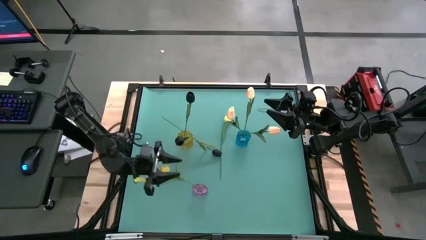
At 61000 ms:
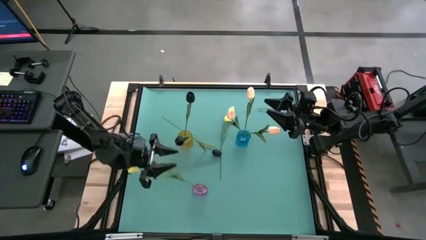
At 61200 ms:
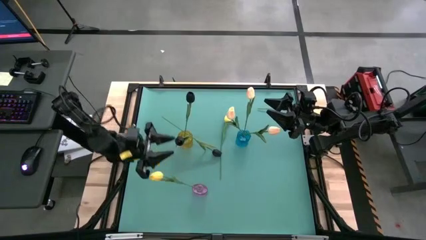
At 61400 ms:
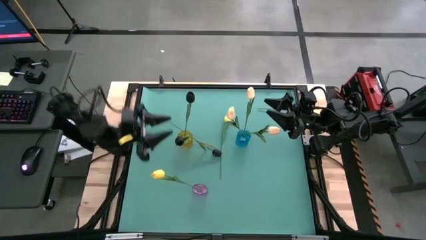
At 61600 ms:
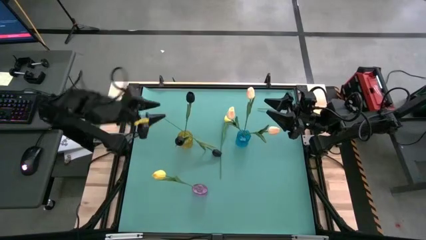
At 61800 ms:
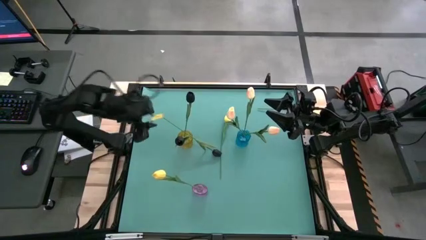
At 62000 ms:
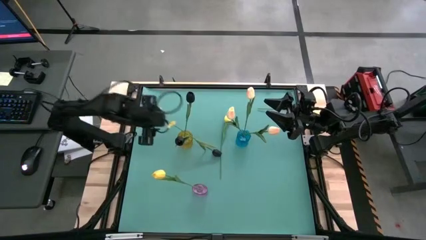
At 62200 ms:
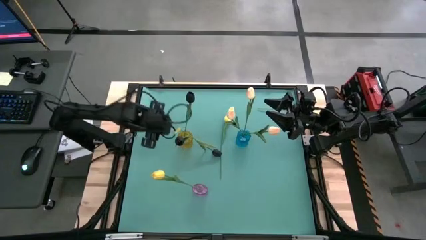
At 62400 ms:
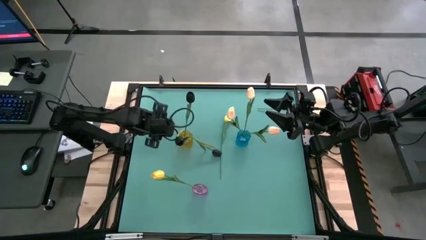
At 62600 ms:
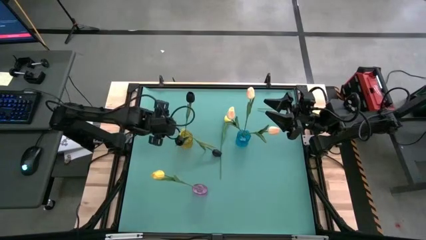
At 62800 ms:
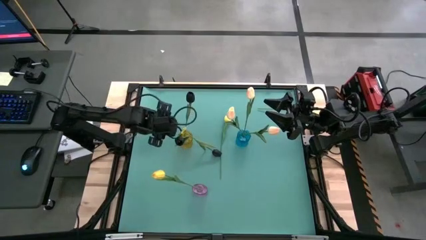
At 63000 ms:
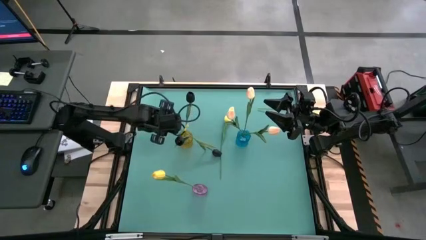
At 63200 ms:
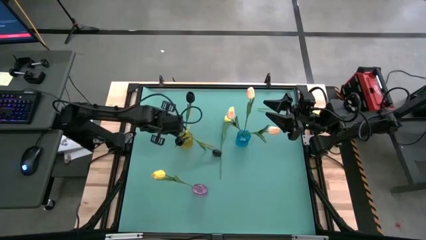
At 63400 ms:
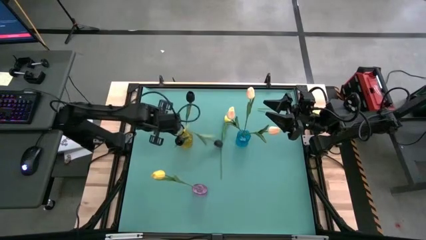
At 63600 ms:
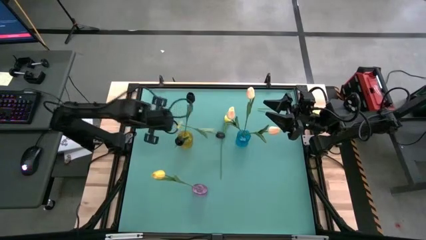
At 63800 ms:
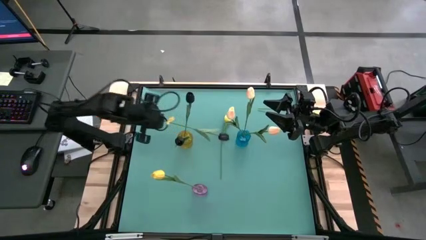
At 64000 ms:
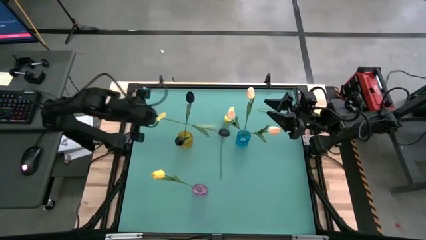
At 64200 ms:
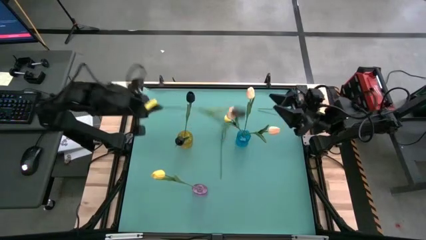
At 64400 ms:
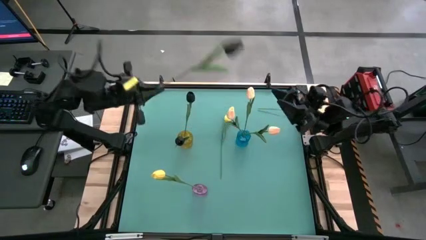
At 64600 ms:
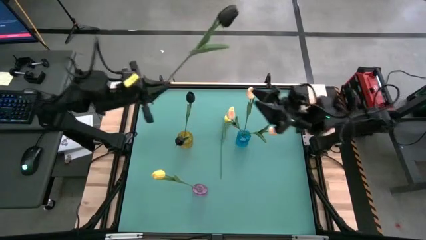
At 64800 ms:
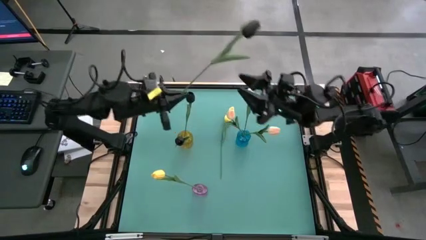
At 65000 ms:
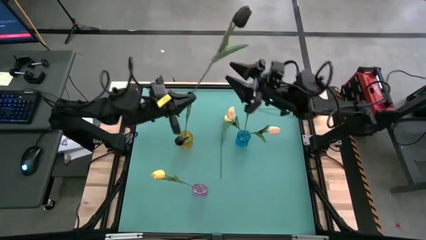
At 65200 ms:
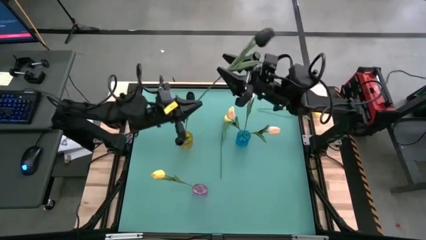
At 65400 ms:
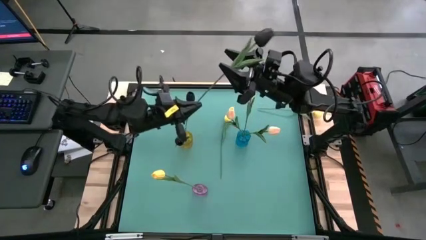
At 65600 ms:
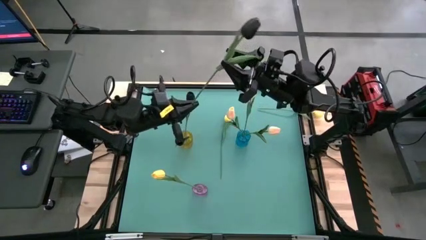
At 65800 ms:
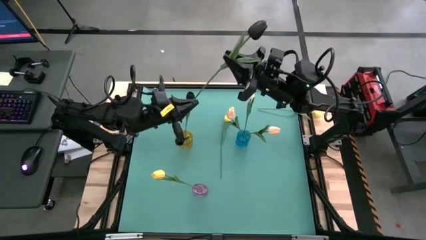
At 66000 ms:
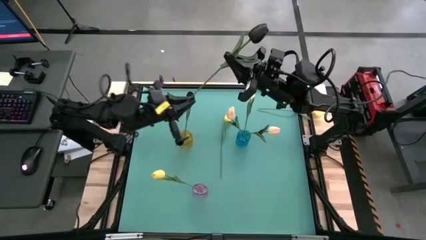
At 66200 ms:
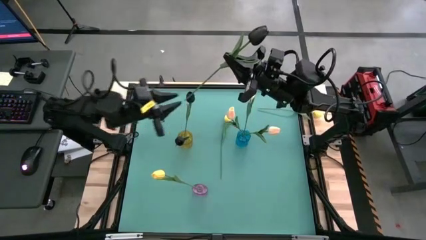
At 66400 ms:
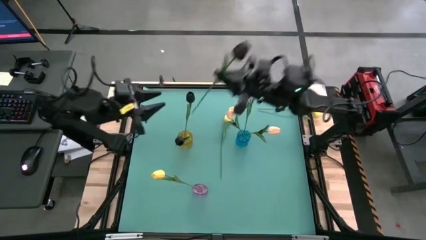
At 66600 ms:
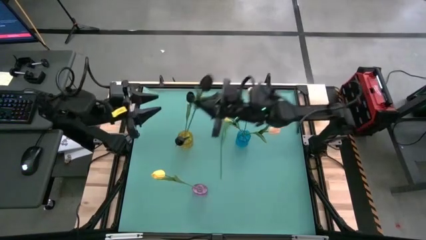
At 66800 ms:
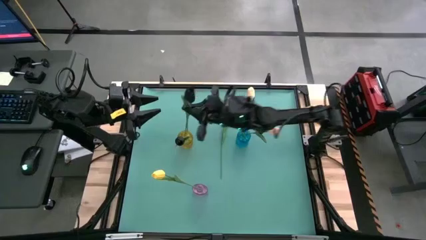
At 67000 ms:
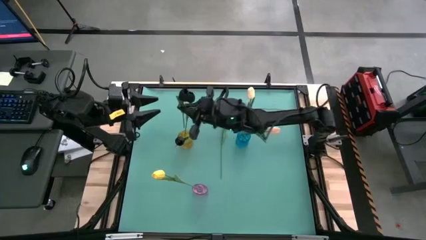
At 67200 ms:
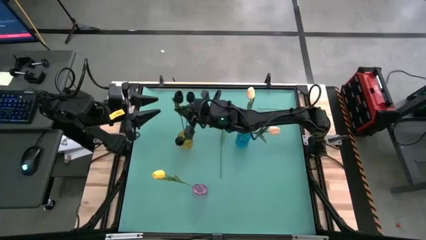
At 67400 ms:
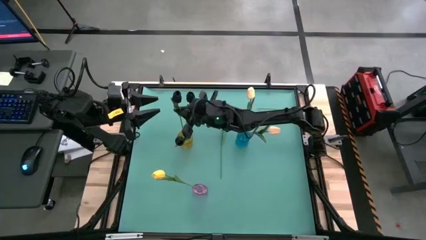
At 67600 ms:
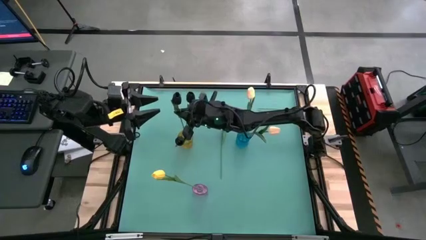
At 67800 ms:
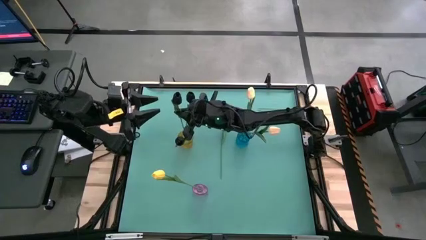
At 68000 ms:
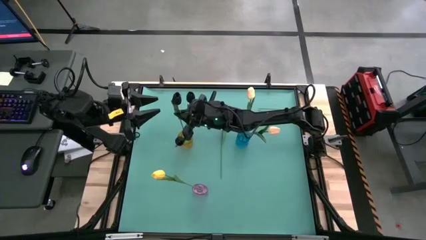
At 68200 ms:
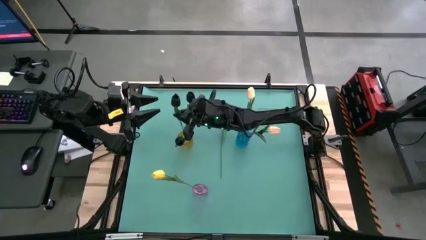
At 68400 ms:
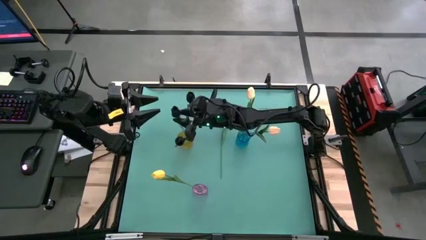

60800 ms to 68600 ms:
Task: Sort flowers into vase by color
Put the black tulip flower into the yellow vase

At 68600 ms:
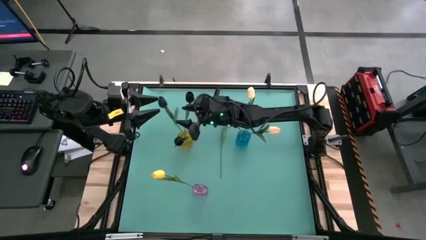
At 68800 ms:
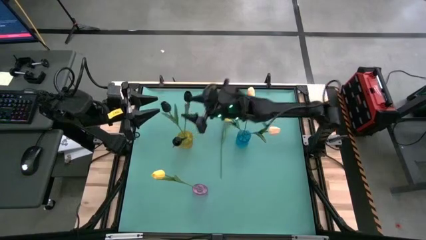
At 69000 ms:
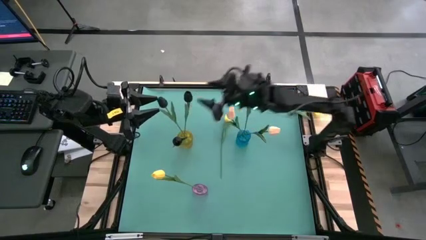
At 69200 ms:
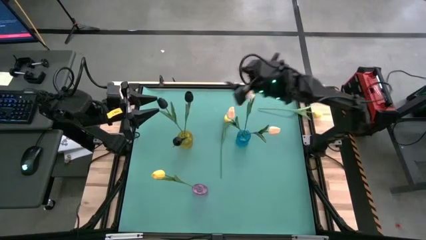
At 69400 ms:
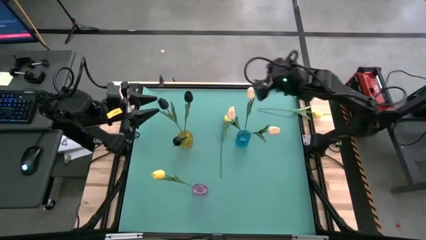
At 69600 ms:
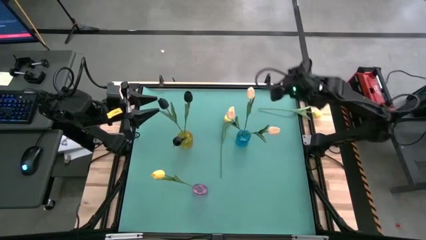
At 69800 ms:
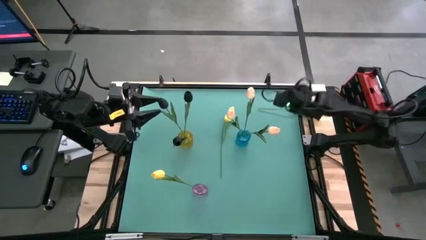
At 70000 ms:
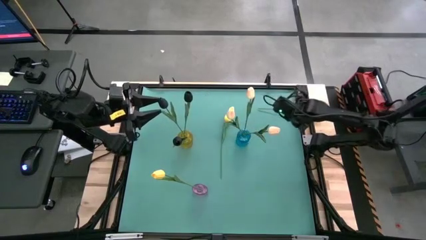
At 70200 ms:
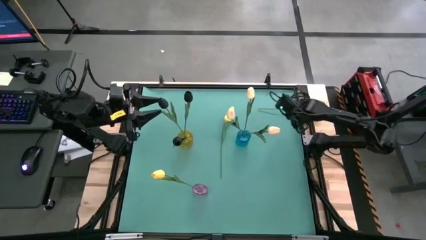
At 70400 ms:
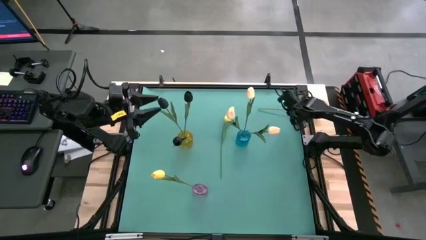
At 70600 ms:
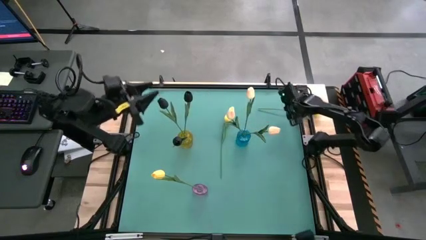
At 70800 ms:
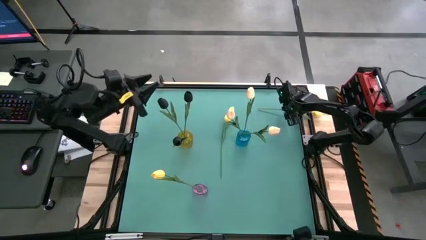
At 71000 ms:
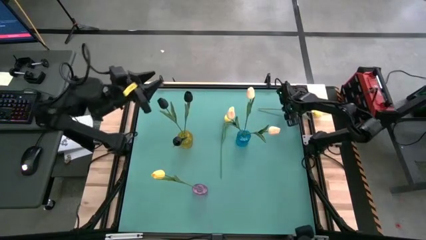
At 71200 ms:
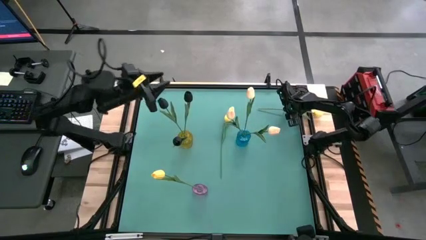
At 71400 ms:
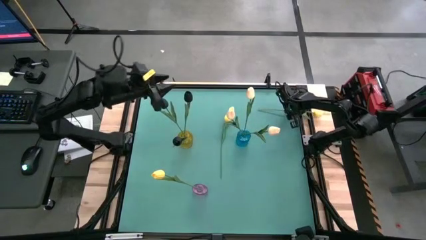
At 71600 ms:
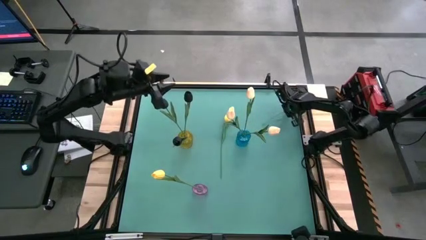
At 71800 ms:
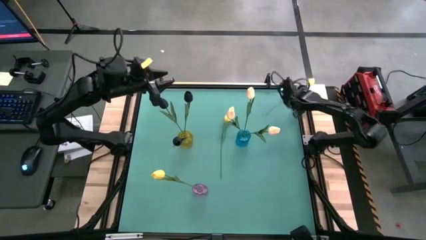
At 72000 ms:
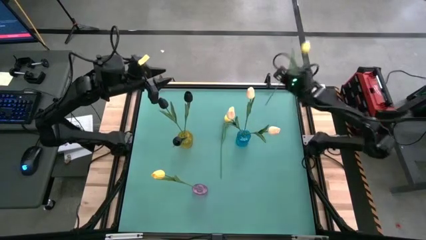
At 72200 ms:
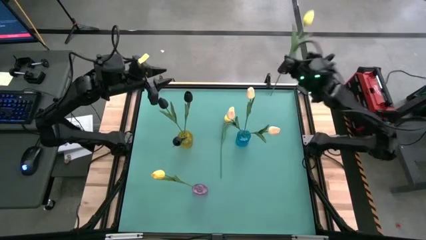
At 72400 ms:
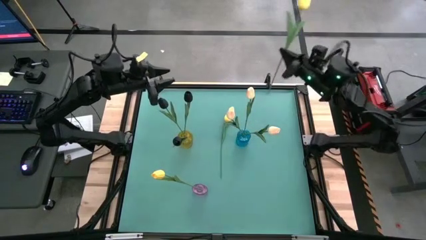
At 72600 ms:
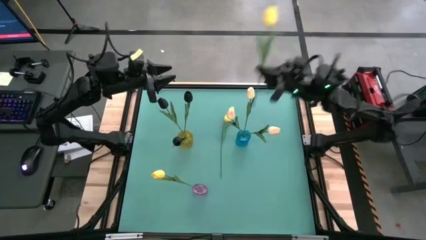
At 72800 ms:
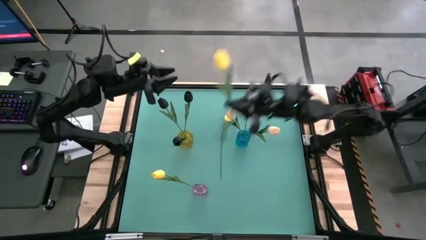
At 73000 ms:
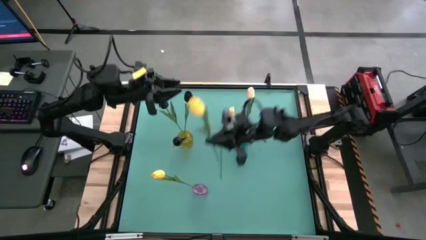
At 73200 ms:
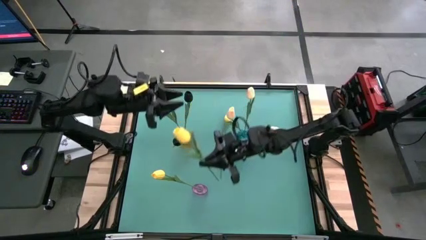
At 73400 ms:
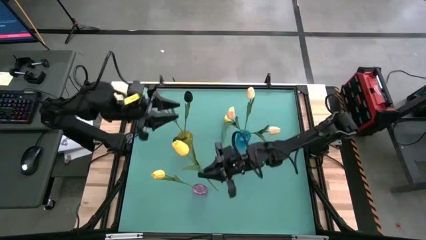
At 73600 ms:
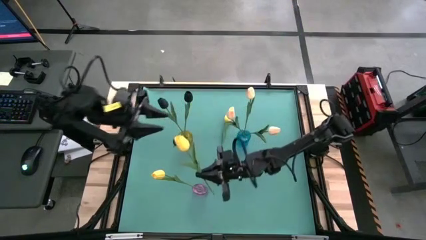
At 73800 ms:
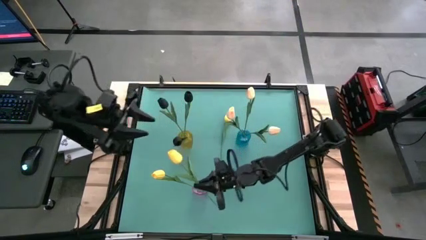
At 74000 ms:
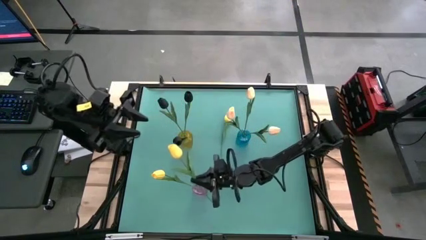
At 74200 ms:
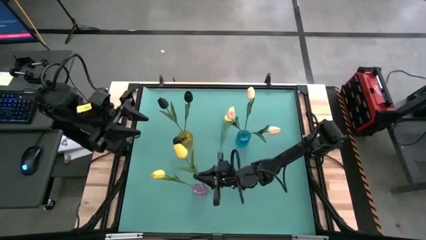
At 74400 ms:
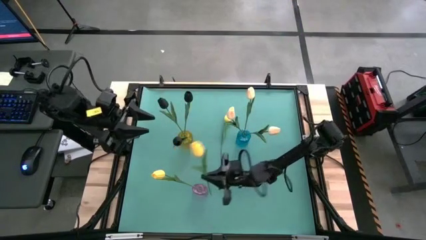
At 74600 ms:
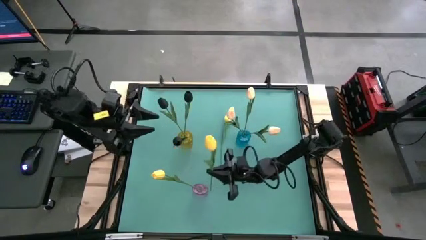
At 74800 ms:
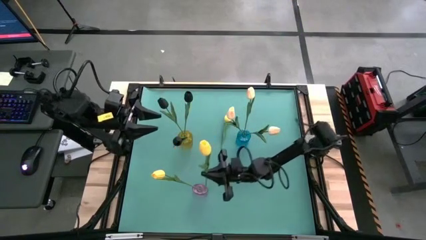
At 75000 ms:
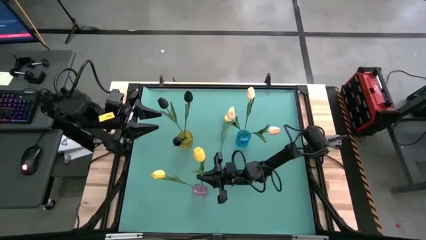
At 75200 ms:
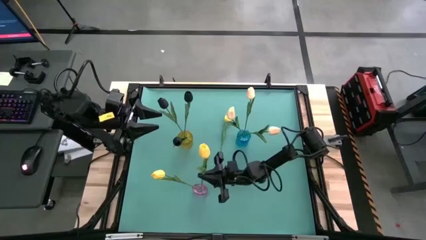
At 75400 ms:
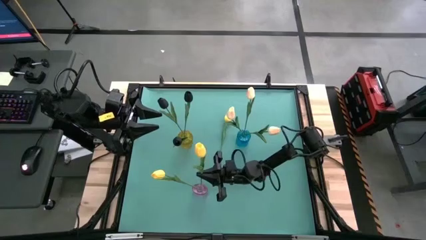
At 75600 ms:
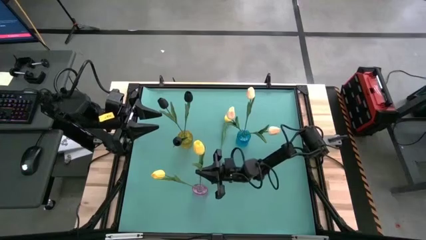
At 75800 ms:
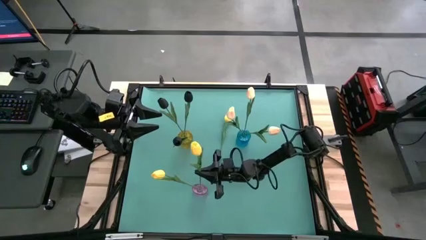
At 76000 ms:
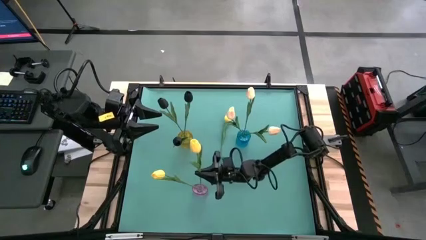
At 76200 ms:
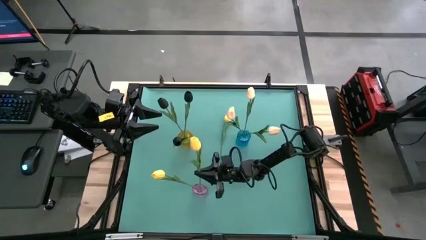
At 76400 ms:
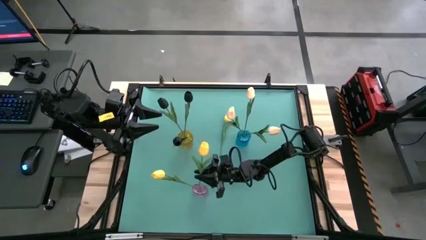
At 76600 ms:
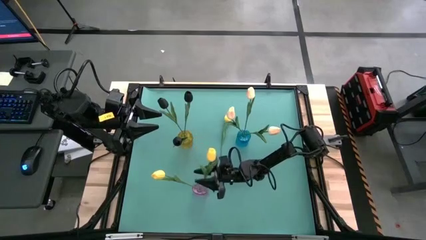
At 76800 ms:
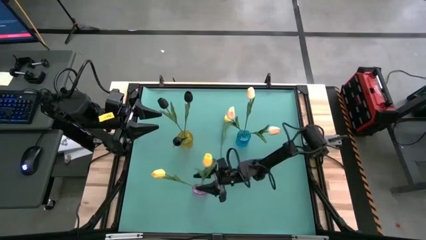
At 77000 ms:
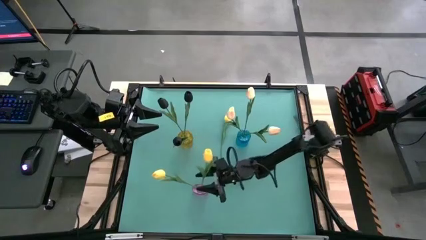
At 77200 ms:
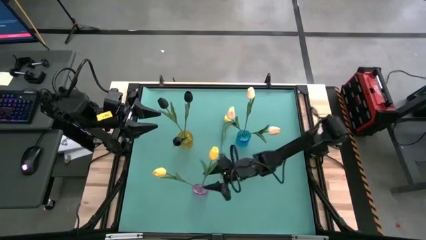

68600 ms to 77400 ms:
Put the right yellow tulip flower into the purple vase
